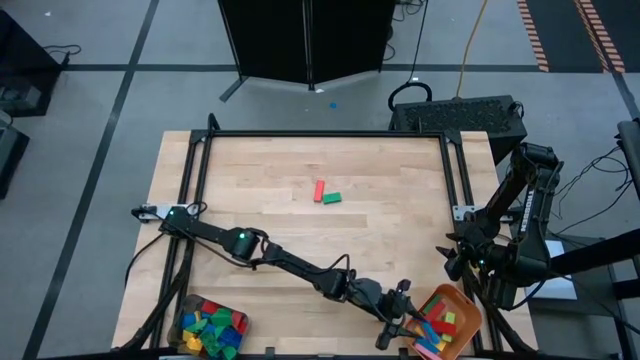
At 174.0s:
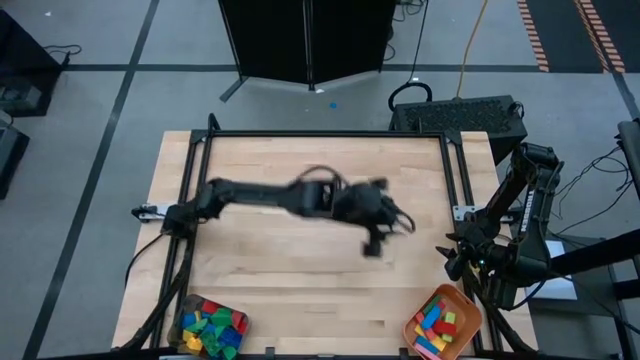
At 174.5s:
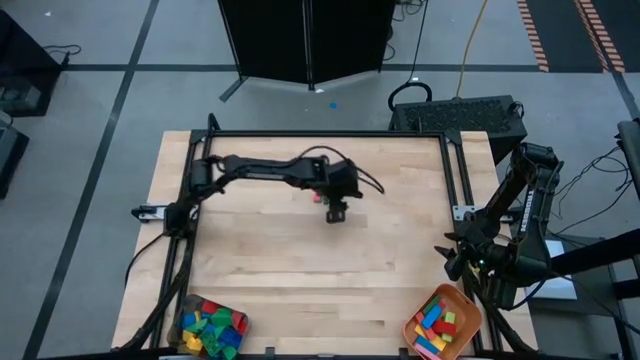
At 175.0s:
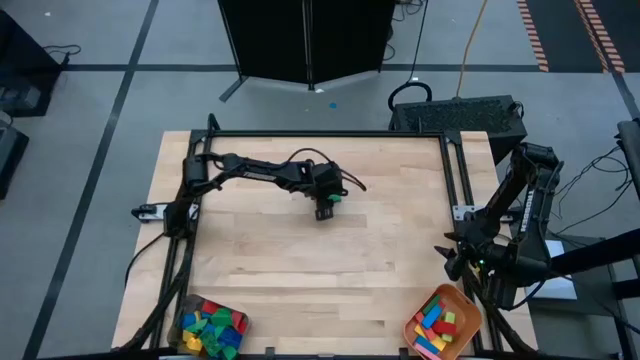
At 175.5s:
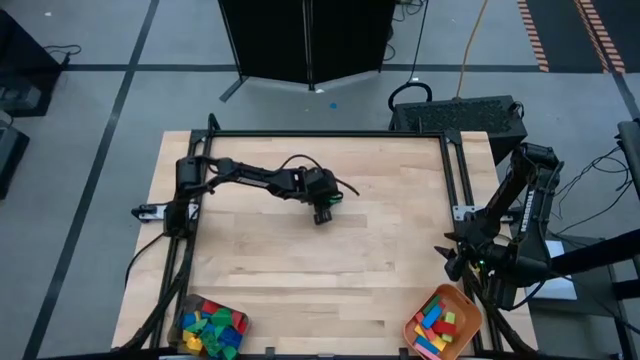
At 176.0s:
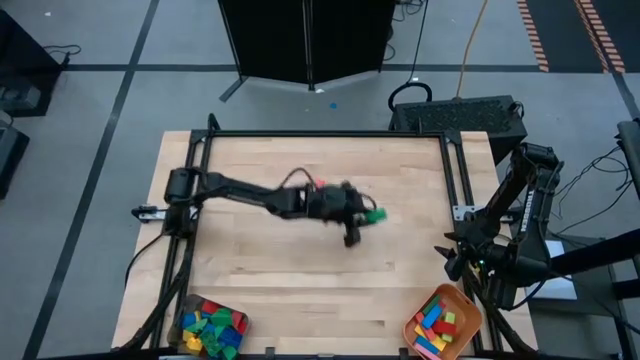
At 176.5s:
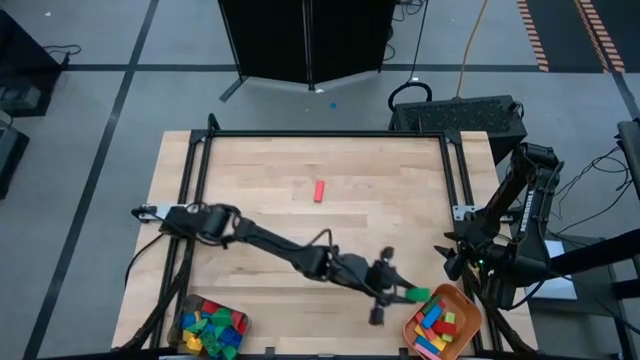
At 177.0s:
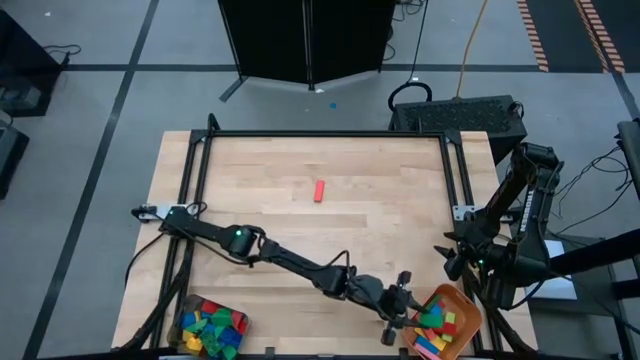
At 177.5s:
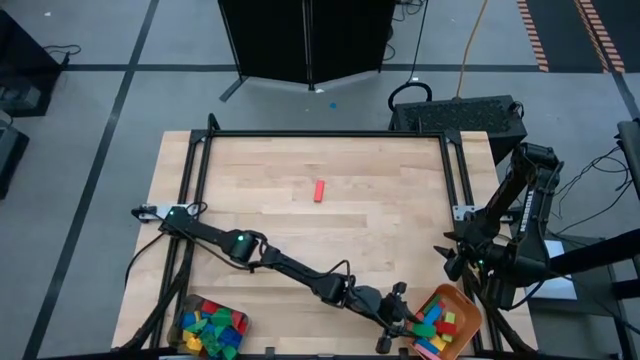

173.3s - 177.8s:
Task: Sort blocks by size
Put the green rectangular block into the orange bin

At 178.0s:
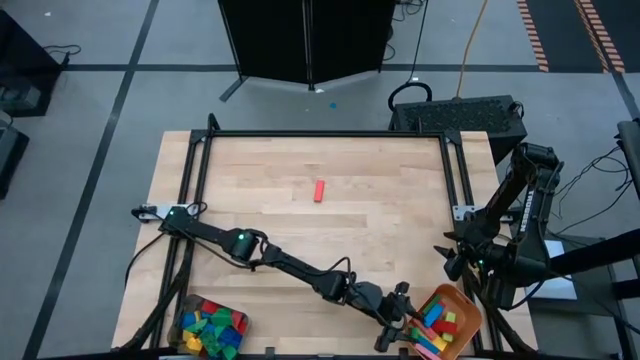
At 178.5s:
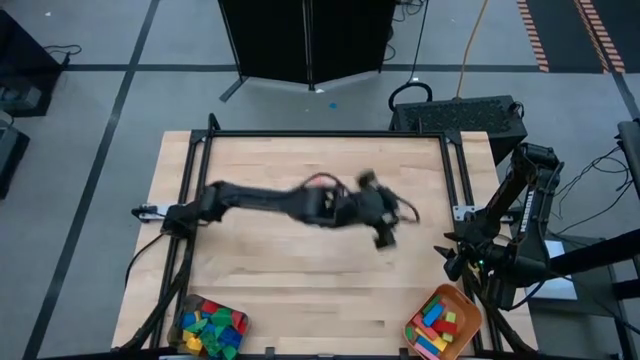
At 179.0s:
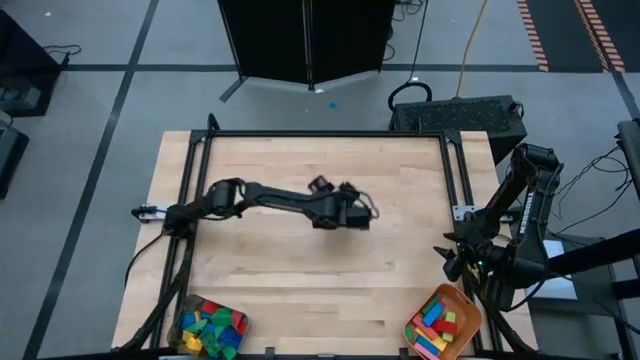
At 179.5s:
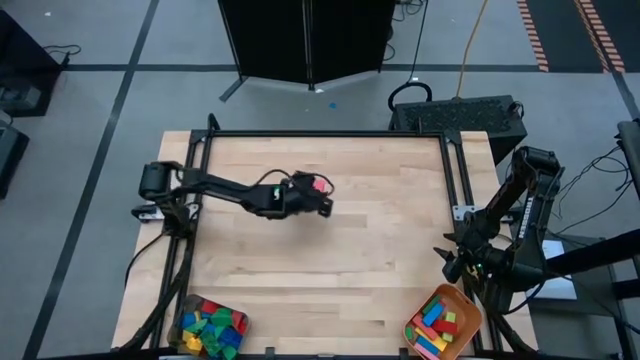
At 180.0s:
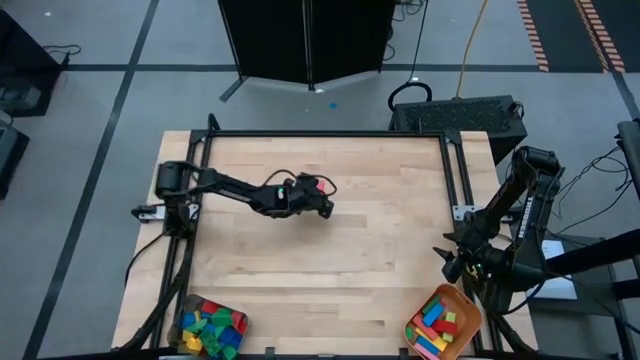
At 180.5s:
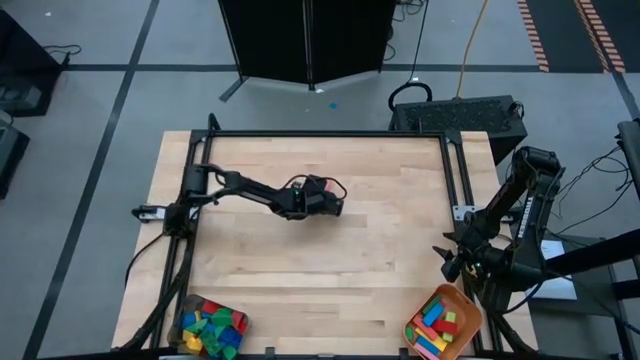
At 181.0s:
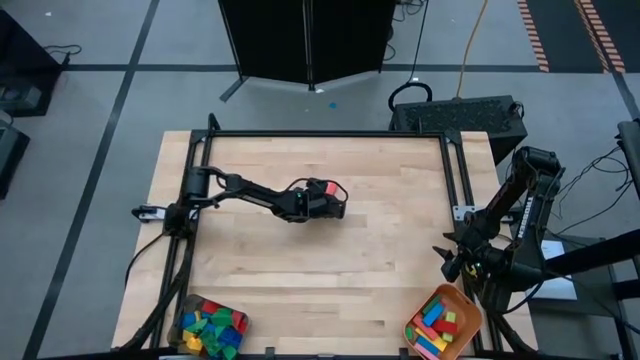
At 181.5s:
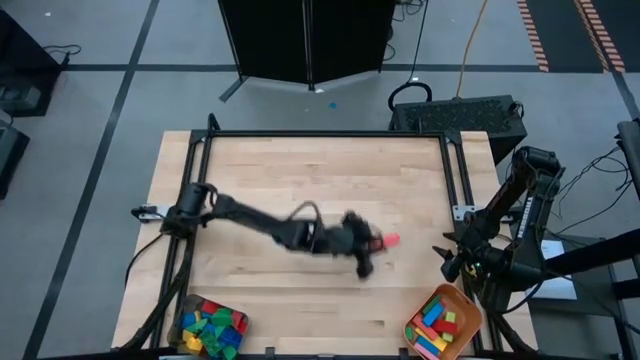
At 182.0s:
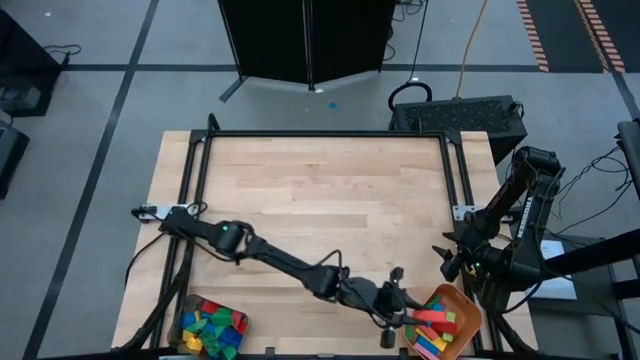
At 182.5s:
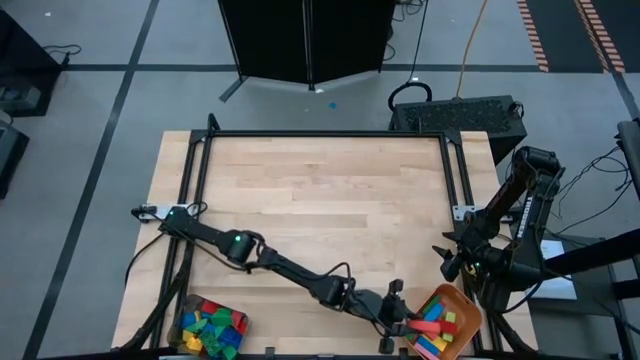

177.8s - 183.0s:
Put the red rectangular block into the orange bin

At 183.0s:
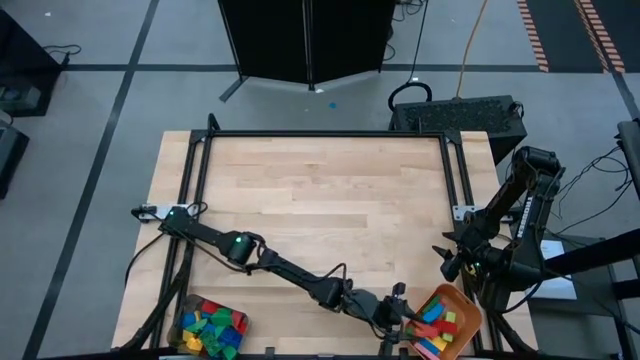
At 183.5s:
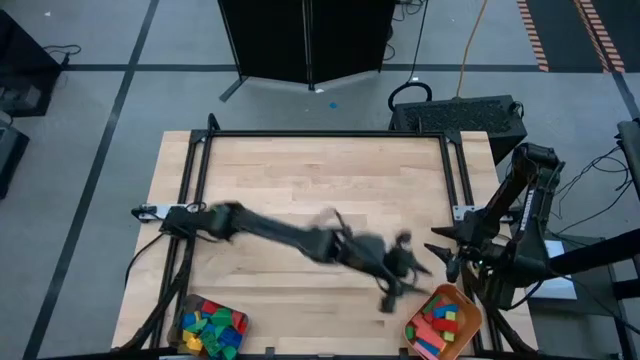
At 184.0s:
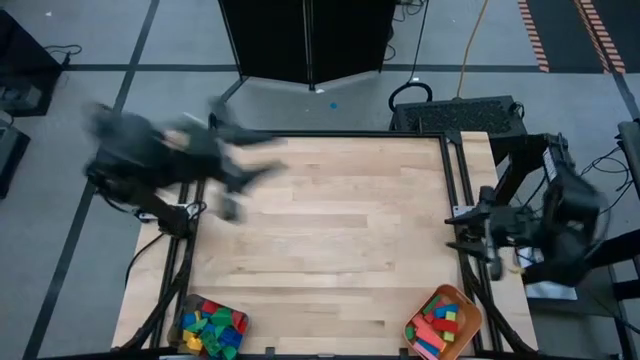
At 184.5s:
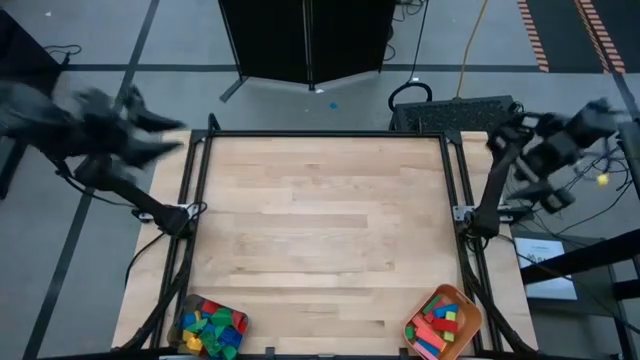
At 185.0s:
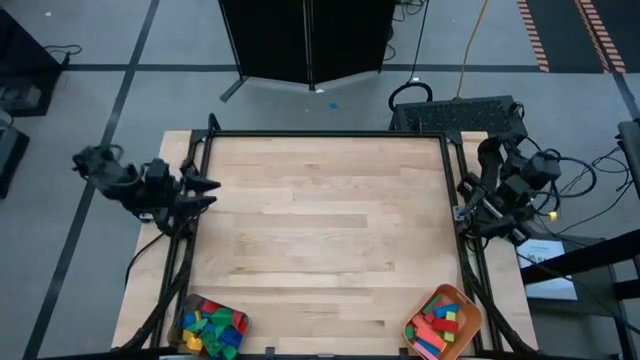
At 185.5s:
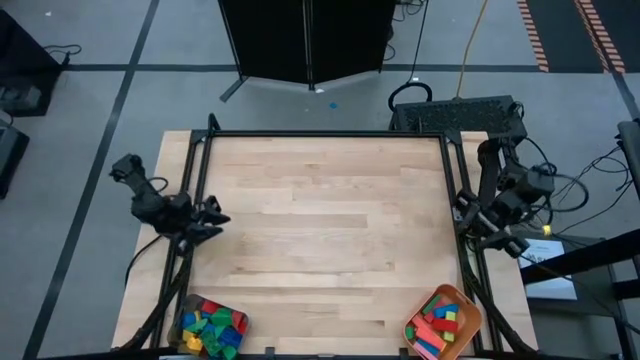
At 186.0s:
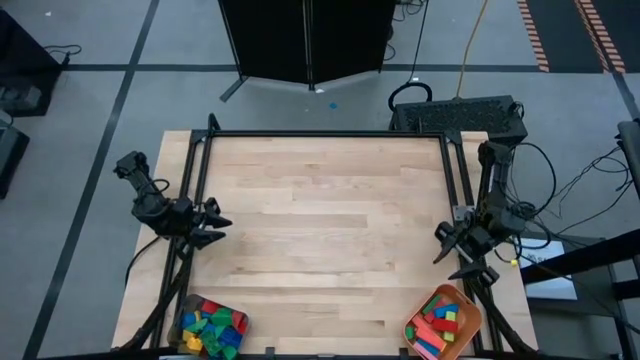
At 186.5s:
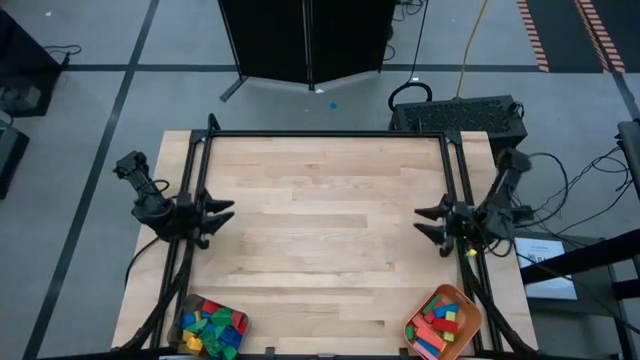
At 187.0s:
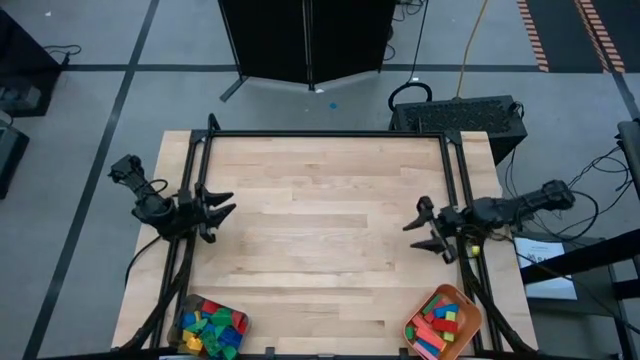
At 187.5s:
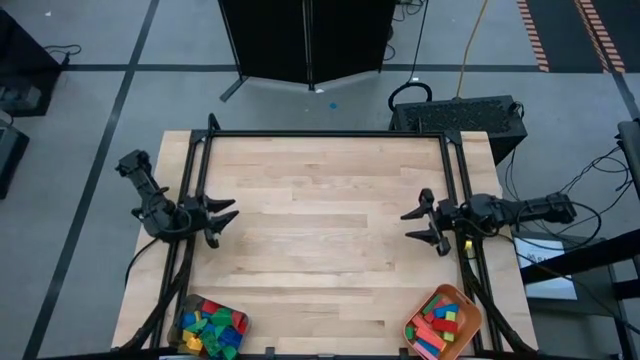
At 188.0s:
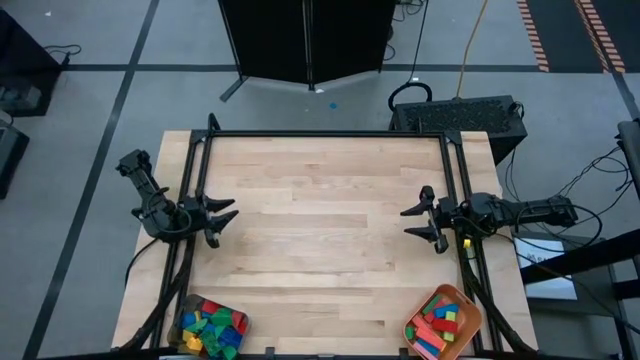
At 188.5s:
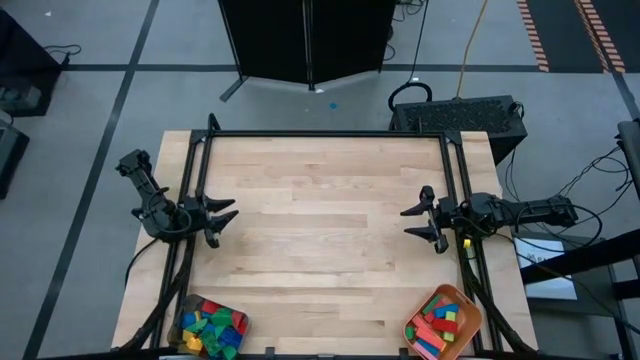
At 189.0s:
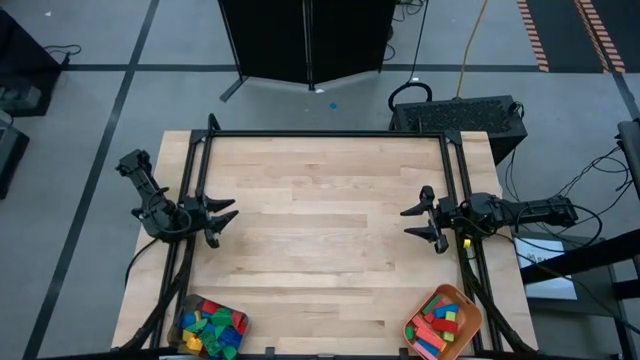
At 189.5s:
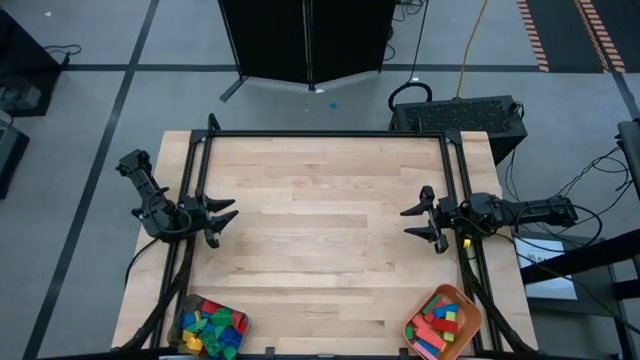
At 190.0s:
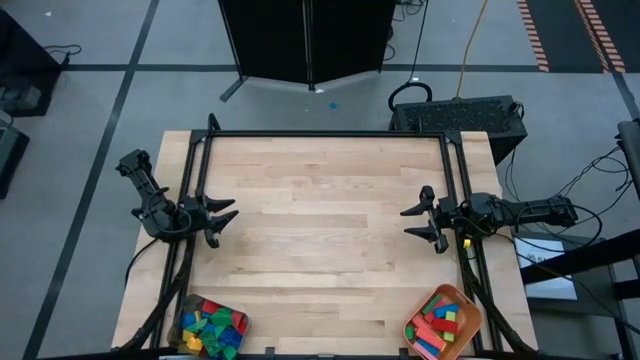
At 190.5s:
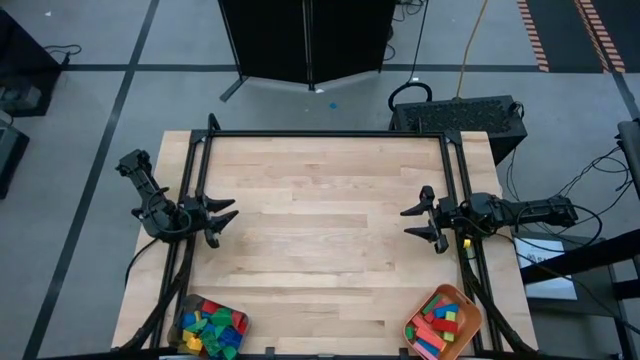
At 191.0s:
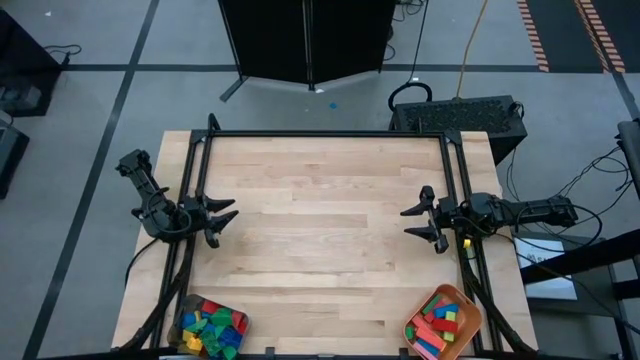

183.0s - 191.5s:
Return to Home Position

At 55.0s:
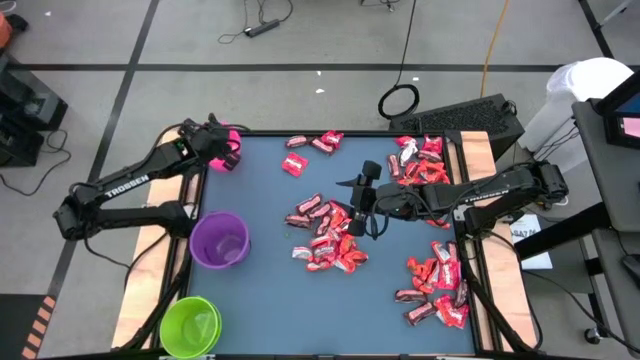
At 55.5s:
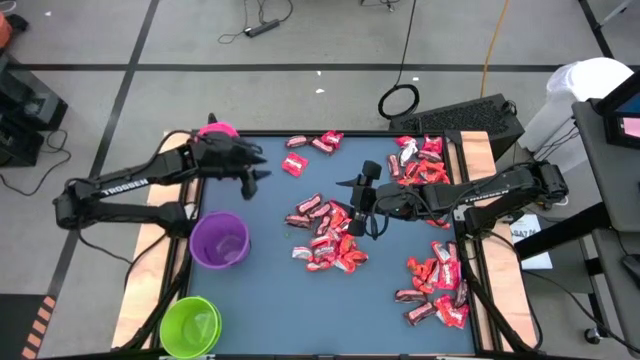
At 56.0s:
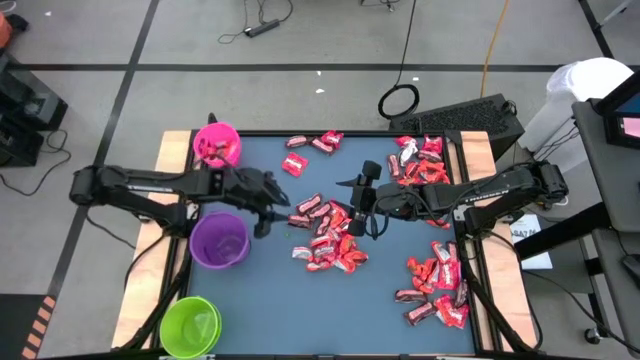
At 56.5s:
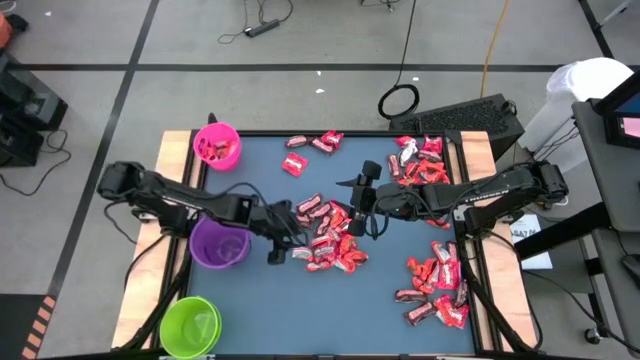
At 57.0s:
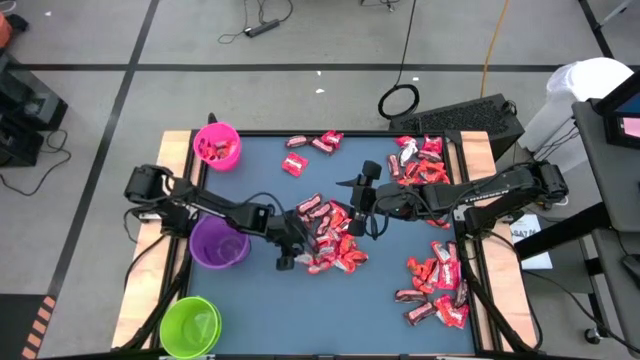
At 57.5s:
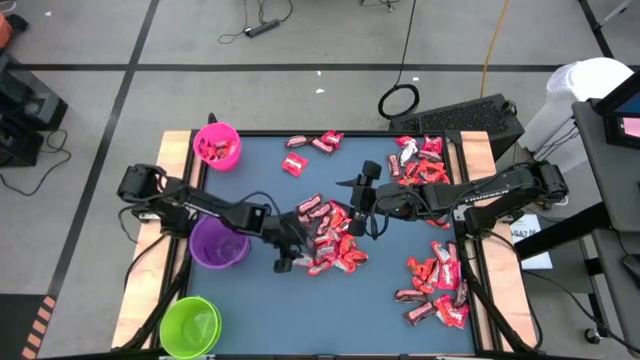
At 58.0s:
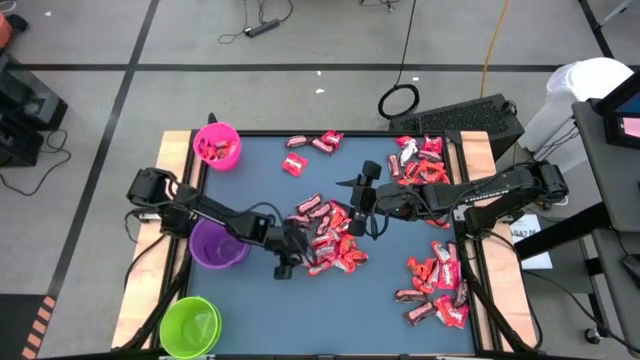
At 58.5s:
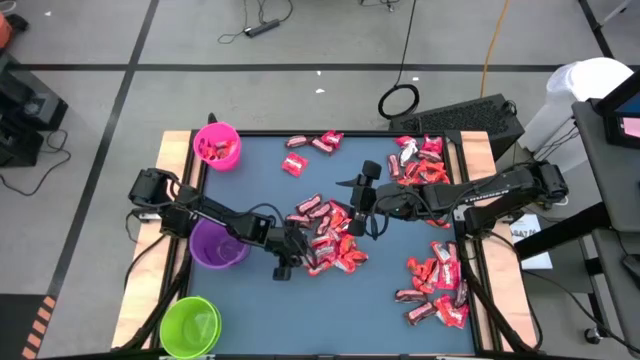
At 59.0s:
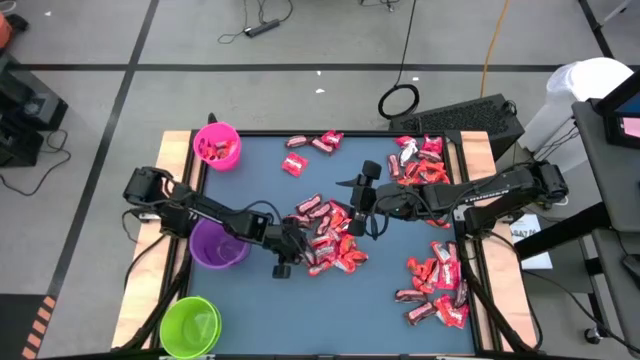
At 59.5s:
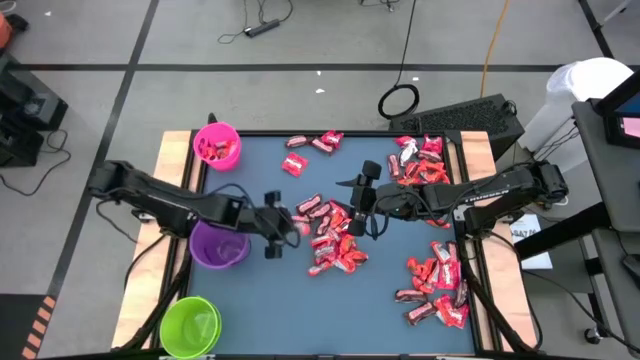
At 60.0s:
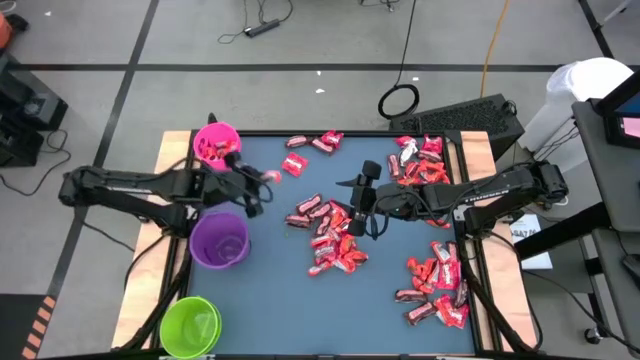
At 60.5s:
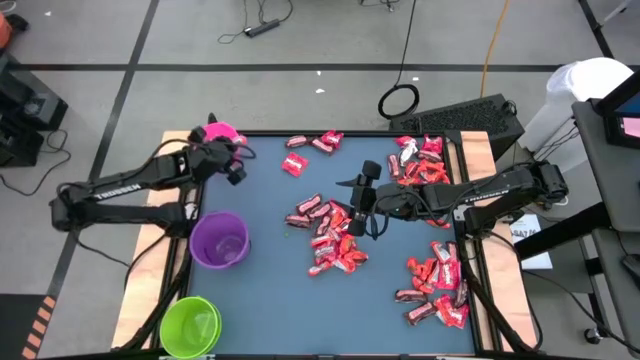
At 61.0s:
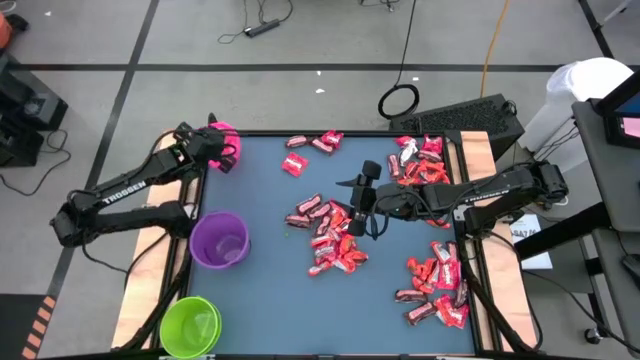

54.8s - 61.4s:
Task: Organize candy in baskets
Put the orange chocolate into the pink bucket
